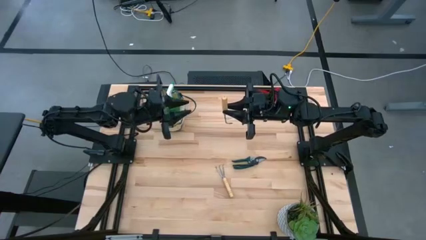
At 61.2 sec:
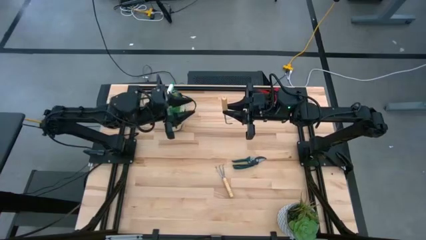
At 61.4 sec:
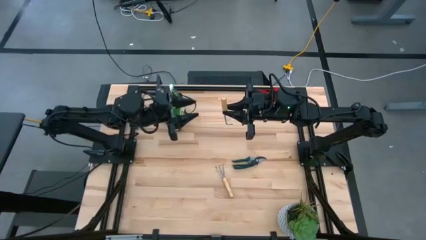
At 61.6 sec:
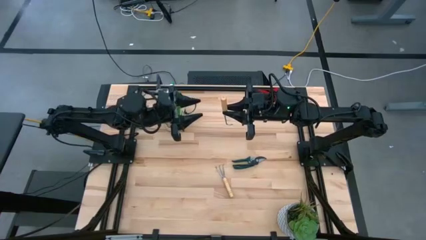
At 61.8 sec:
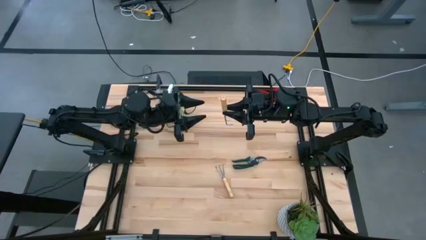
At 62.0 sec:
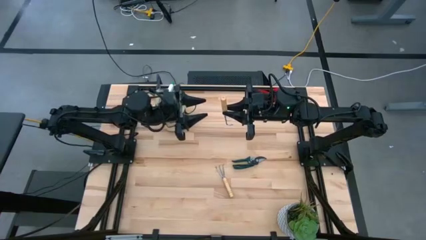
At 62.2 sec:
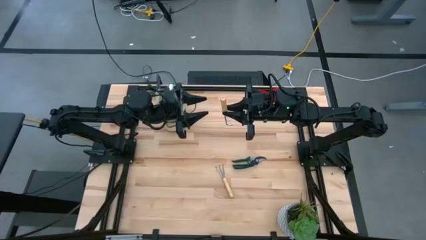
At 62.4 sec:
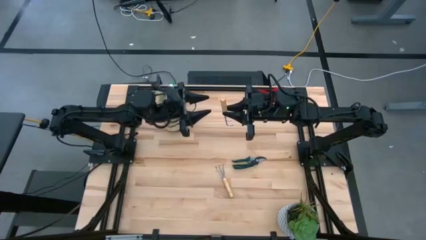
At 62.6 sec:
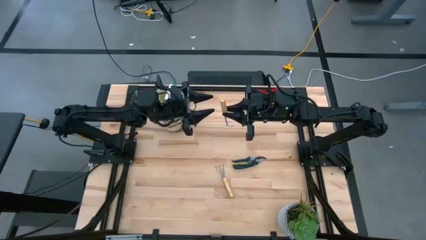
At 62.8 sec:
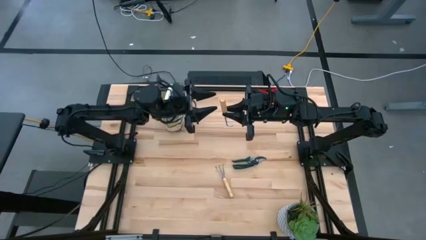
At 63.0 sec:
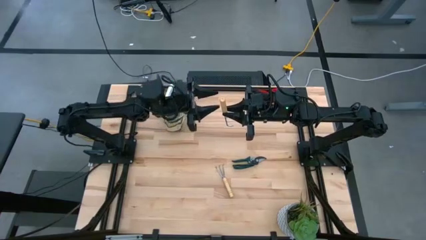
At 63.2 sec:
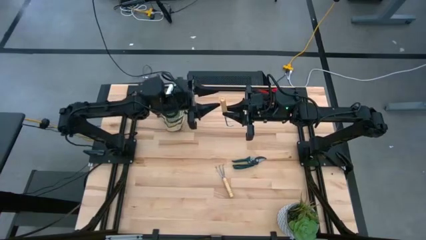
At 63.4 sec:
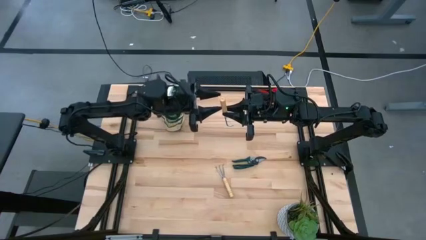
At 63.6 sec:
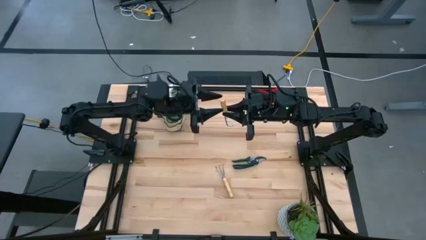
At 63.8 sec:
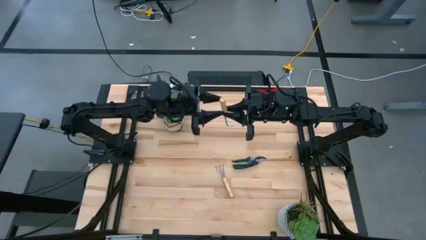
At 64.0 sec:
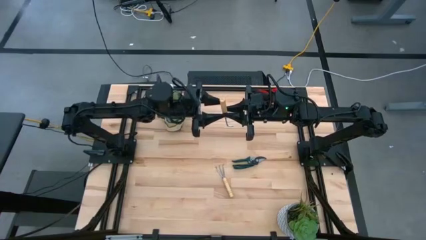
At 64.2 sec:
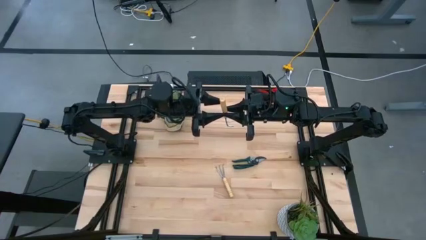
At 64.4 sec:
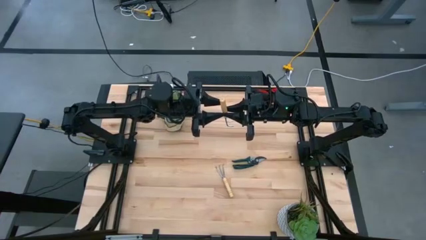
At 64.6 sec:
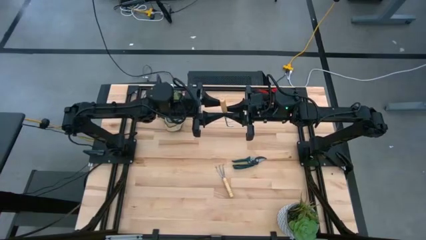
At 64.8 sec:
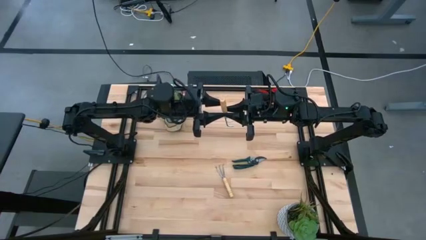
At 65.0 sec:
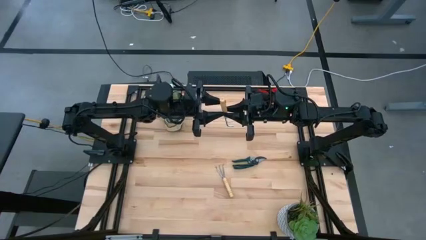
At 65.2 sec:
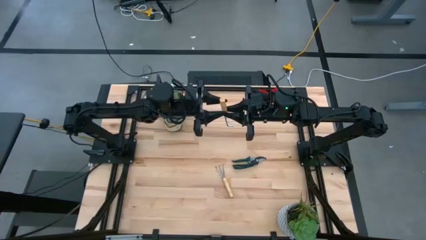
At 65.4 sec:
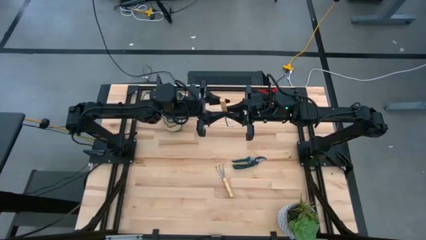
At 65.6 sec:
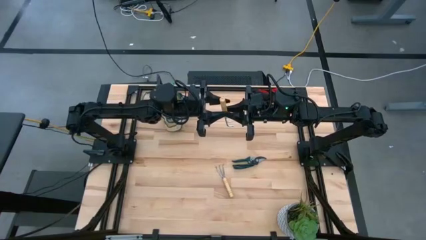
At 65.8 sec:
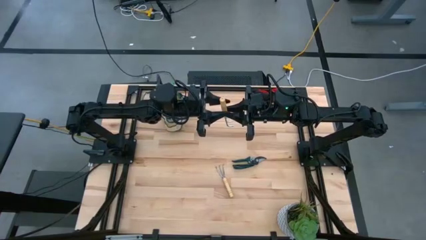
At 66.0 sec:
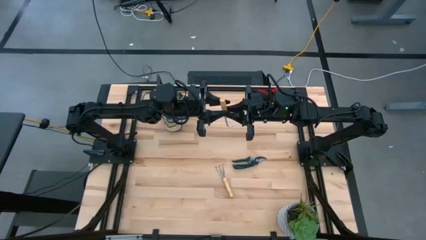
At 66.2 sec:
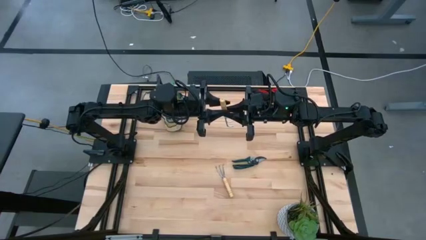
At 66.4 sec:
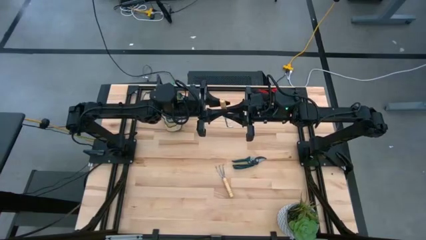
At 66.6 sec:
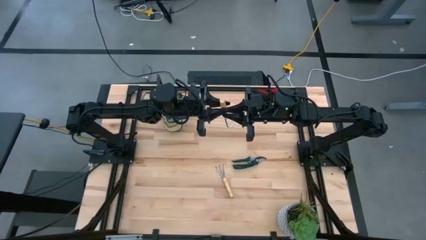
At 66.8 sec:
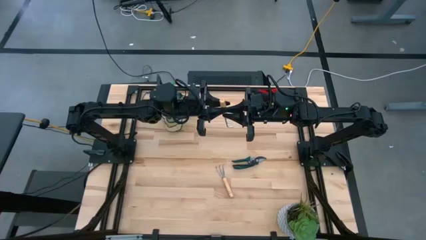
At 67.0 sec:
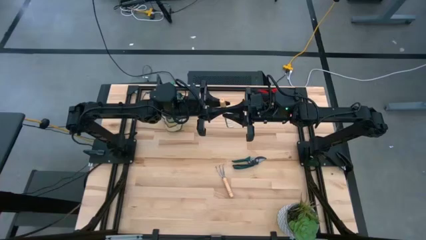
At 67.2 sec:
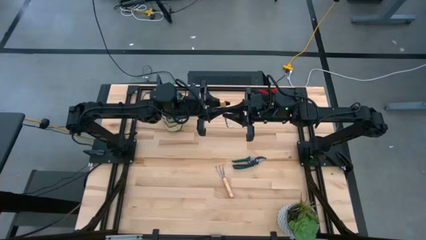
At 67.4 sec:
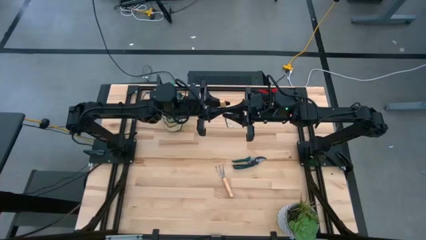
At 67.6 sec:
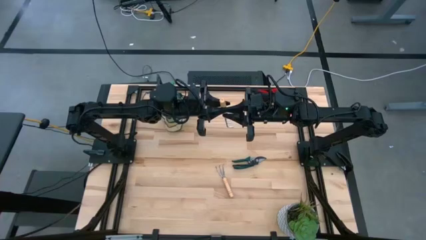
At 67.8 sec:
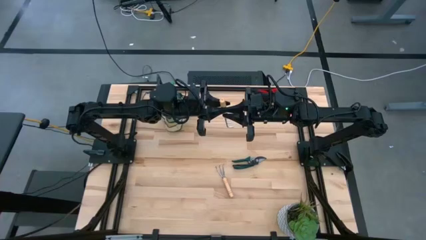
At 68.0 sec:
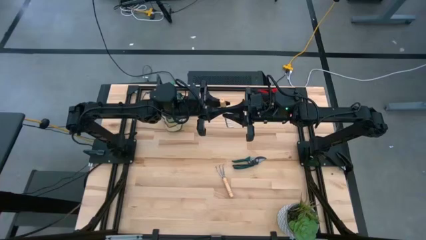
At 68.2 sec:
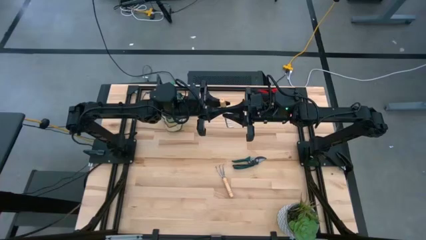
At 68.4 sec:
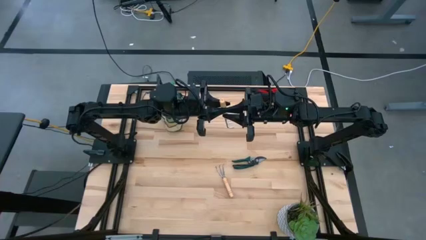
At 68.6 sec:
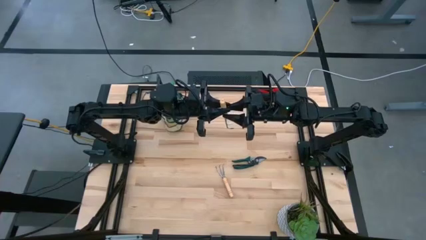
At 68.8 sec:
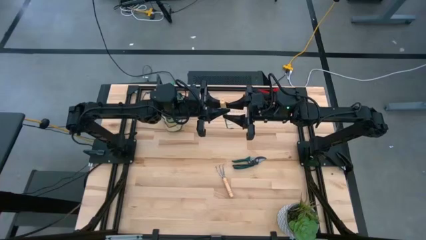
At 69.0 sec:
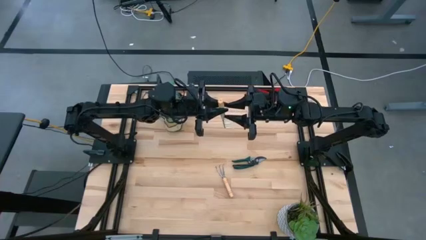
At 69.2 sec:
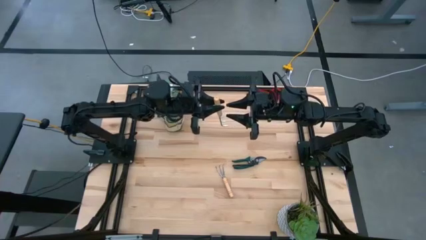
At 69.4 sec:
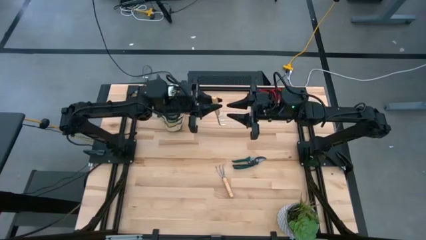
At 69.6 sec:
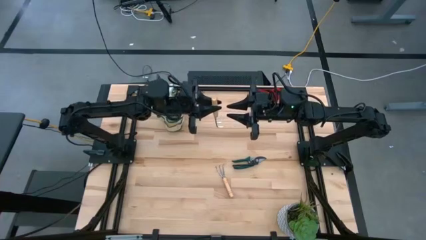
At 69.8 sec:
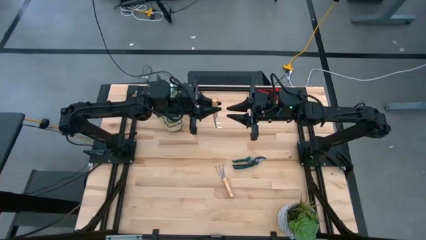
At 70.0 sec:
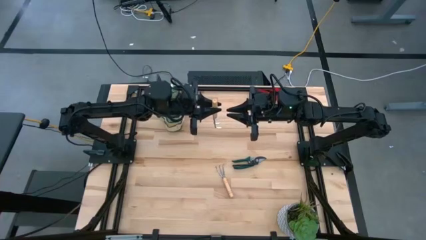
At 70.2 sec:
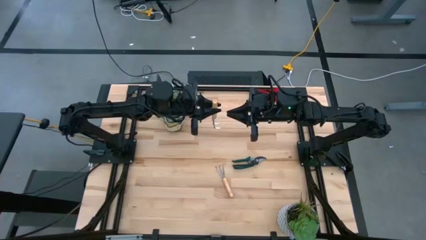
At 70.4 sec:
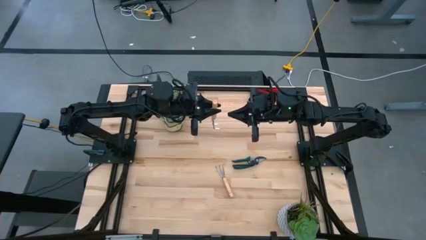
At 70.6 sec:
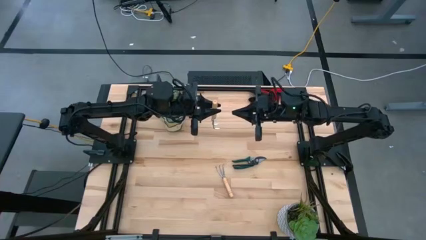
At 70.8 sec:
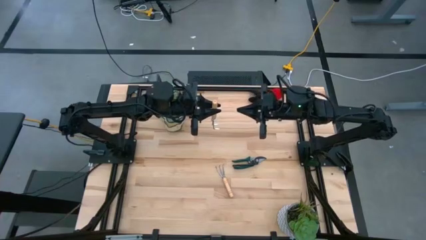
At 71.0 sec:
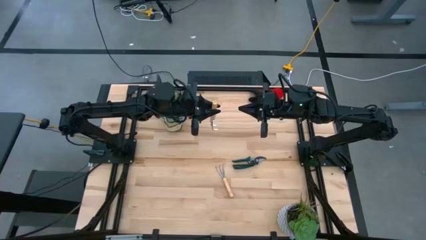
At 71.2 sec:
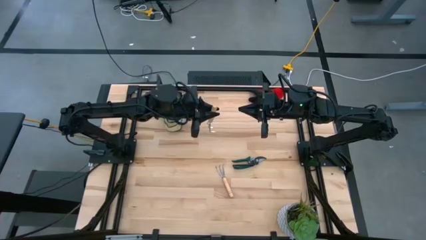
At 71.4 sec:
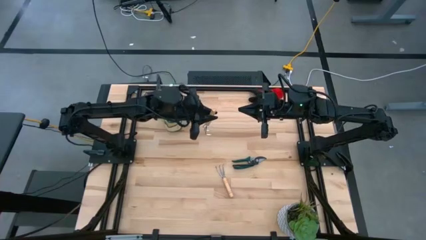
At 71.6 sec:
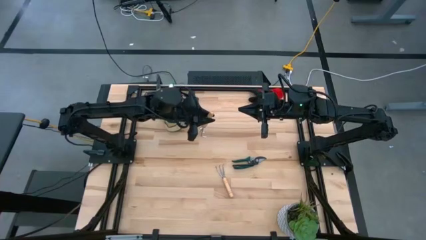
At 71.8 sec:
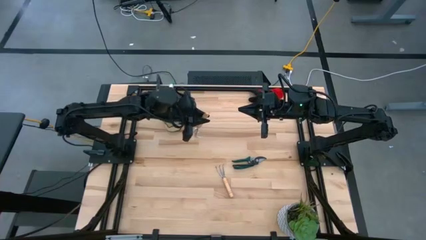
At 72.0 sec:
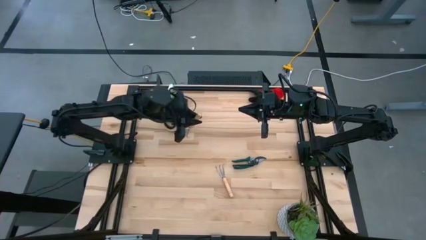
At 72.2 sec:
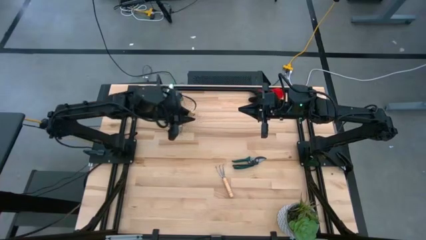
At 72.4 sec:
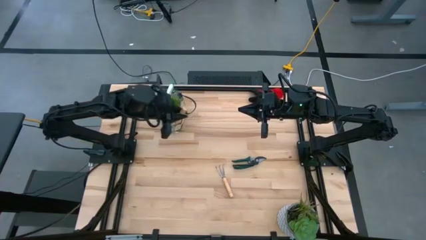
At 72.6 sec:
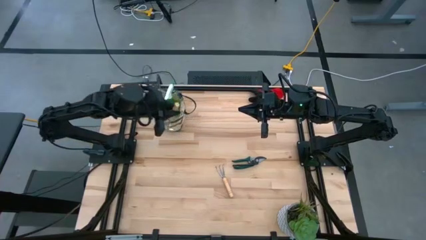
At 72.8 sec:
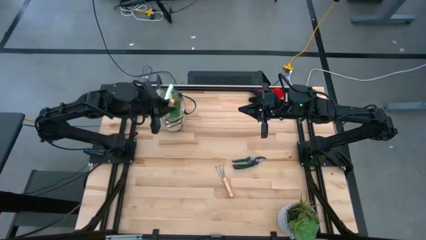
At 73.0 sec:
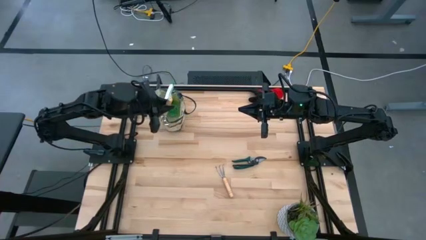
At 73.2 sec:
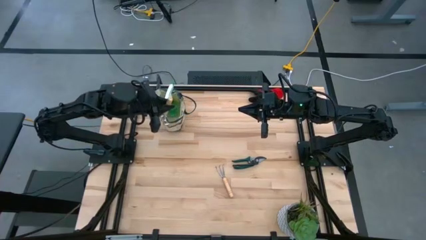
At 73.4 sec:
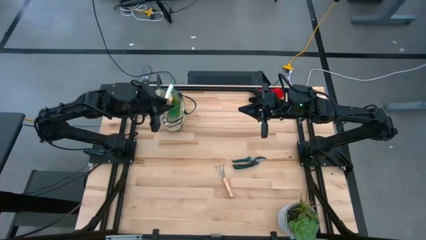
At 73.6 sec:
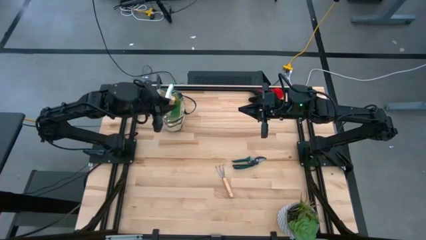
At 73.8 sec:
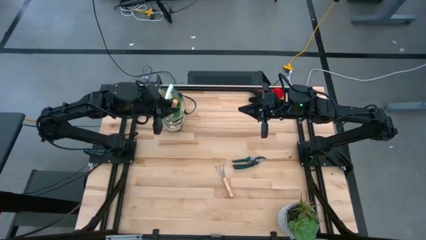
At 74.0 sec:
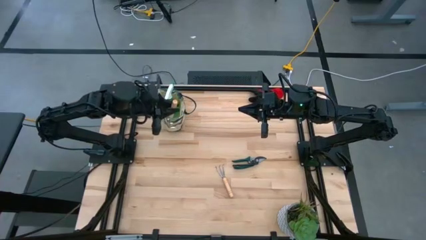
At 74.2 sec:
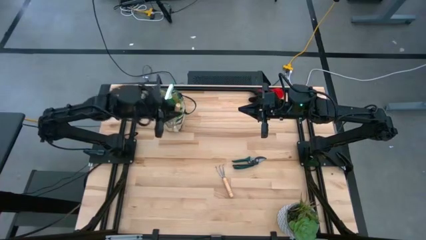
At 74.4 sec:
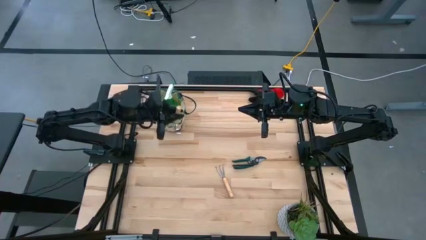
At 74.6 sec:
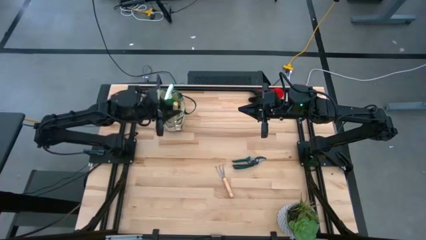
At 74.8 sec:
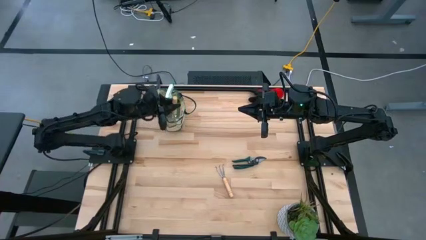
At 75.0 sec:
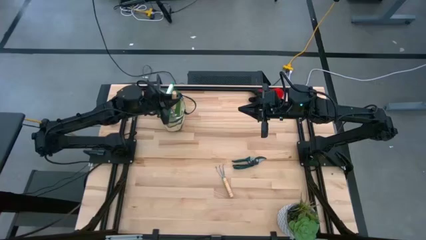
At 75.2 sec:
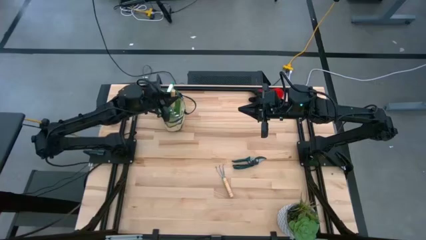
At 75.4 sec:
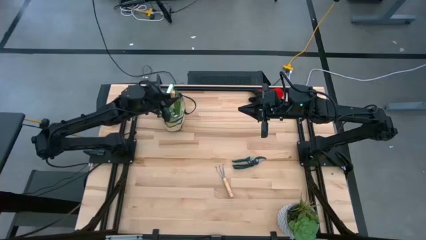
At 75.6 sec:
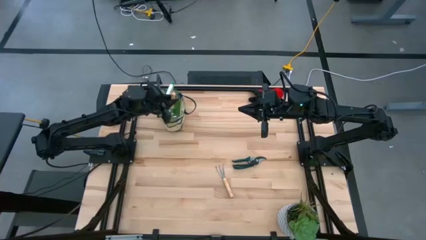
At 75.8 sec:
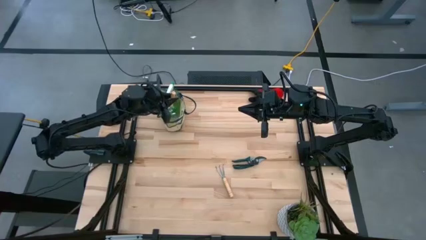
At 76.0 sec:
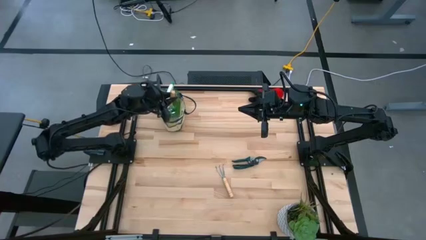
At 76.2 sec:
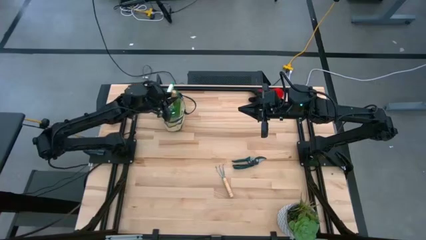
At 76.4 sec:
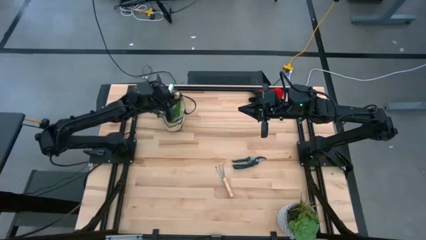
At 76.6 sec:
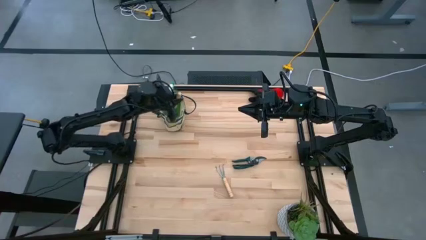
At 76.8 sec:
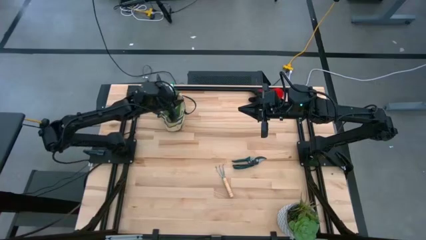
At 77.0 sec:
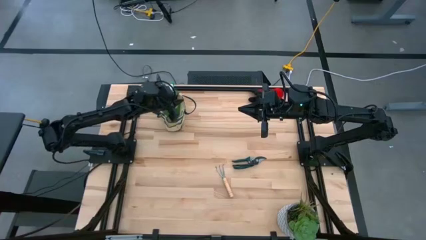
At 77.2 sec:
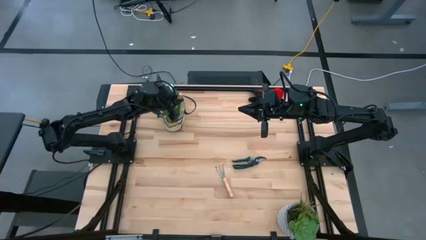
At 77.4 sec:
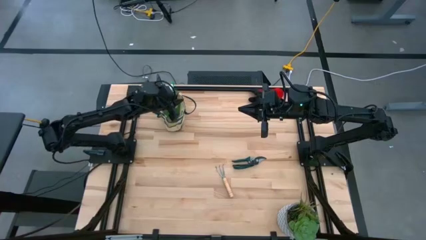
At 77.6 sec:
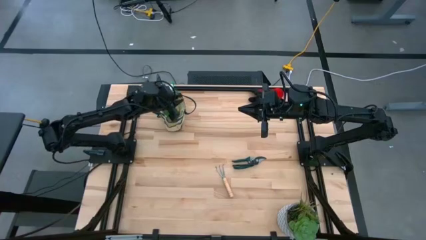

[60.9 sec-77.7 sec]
Task: Pick & Place Garden tools in Gardening bag
Put the brown hand rake into the gardening bag
